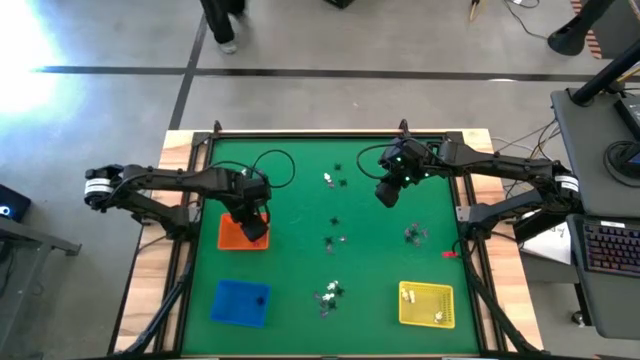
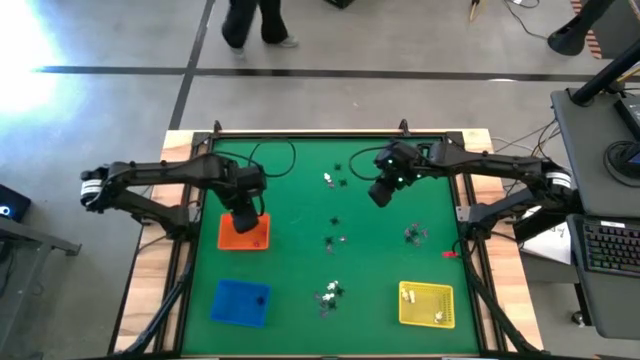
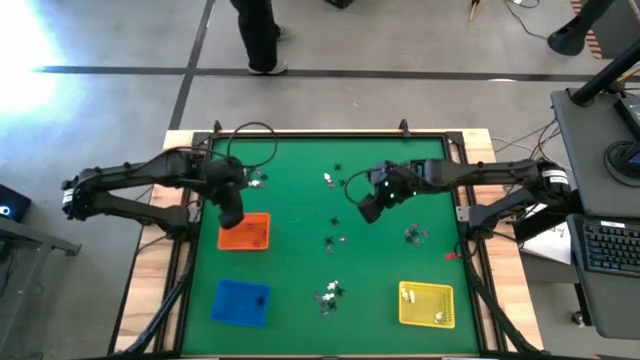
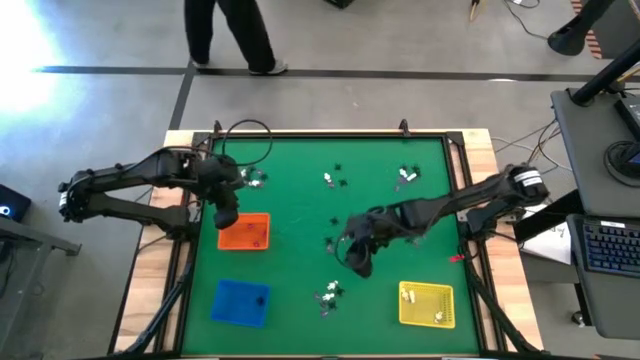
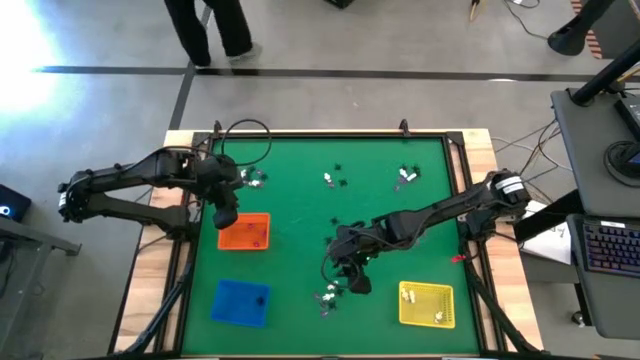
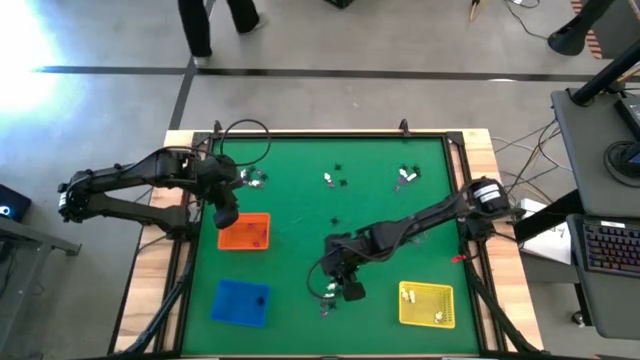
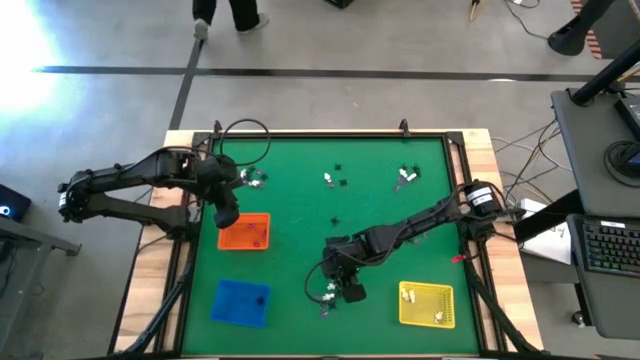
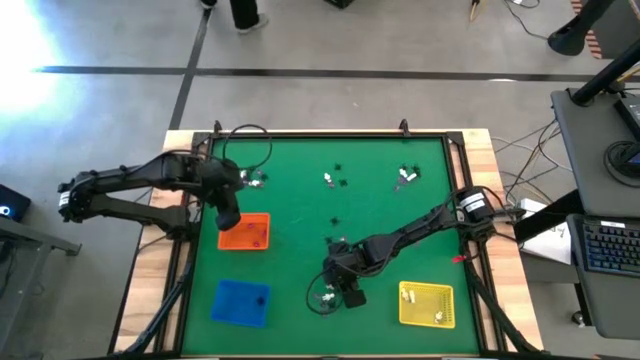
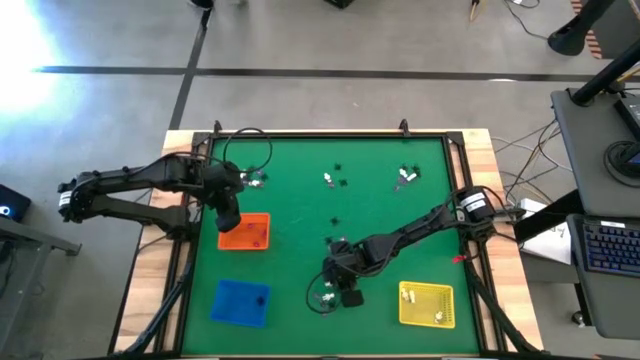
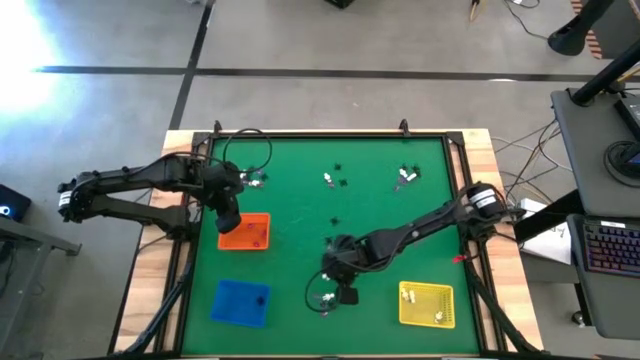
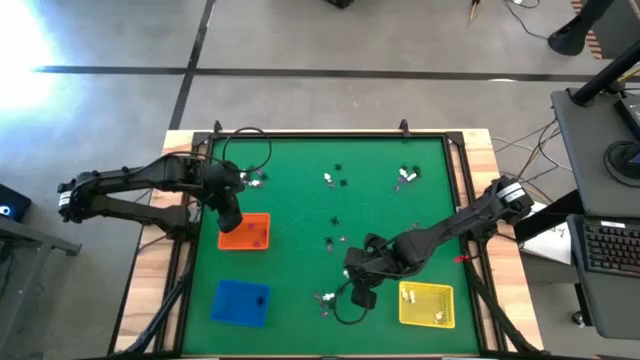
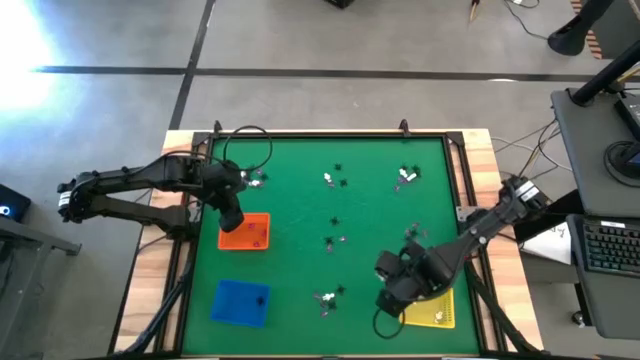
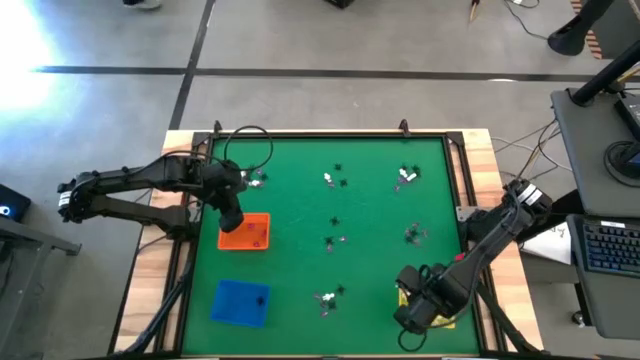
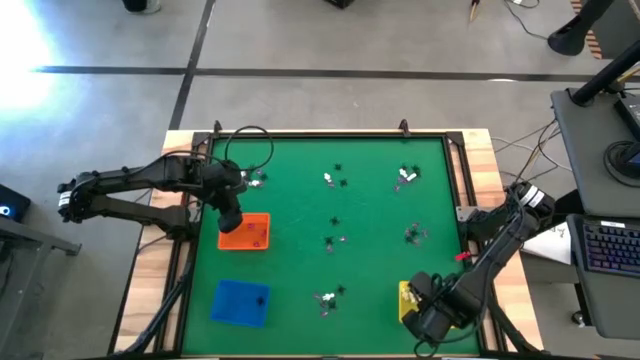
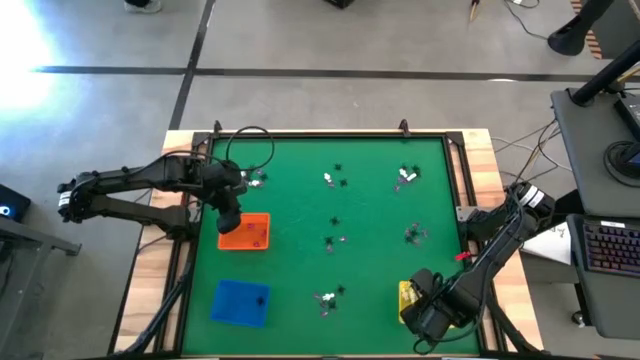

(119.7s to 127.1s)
Task: Sort Halloween decoration
Put the white skeleton toy into the yellow bin

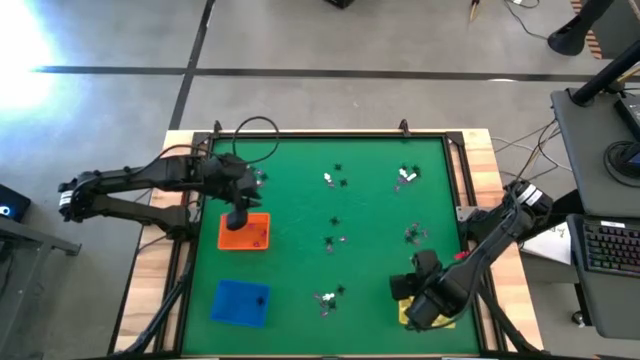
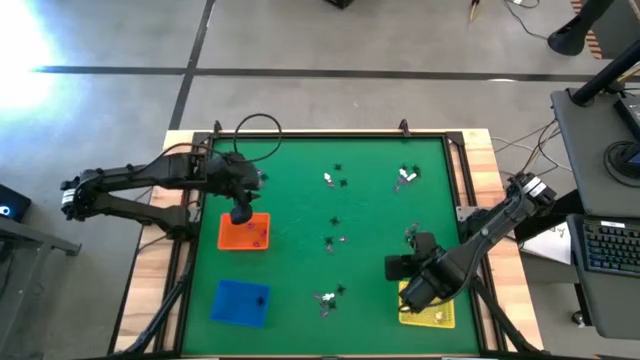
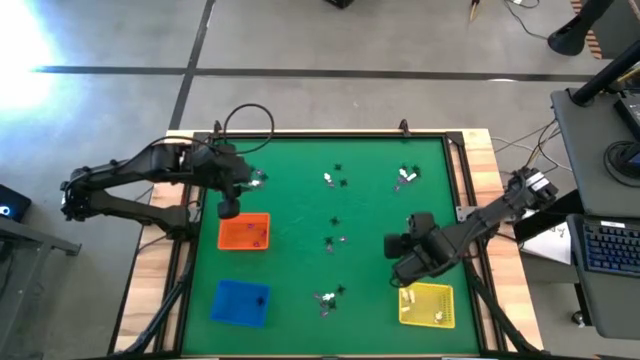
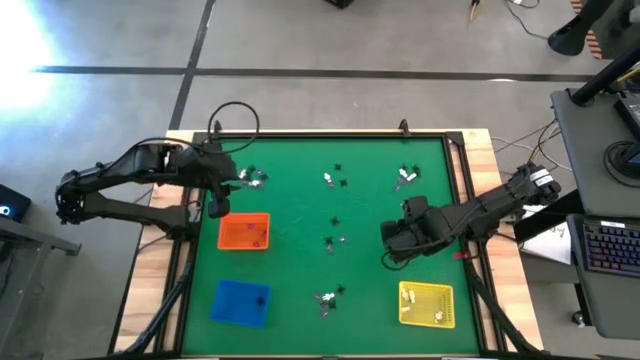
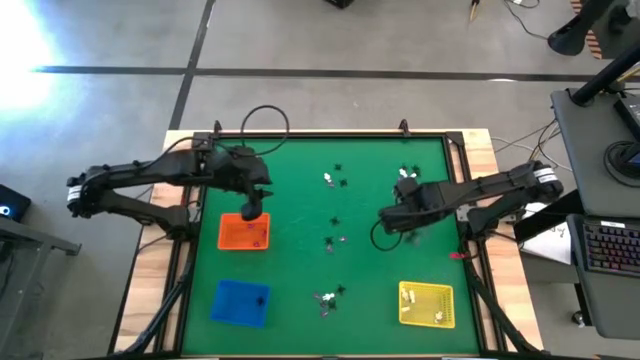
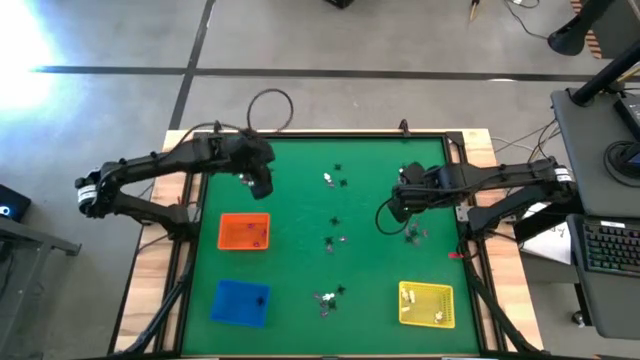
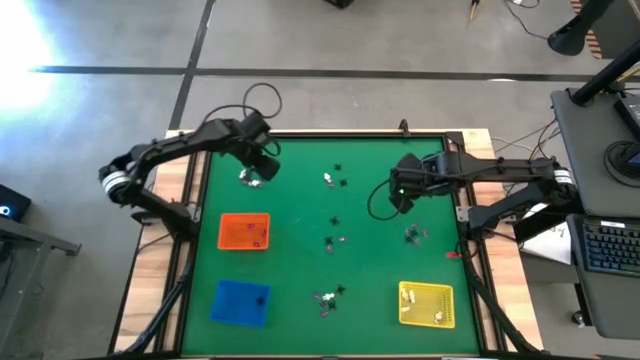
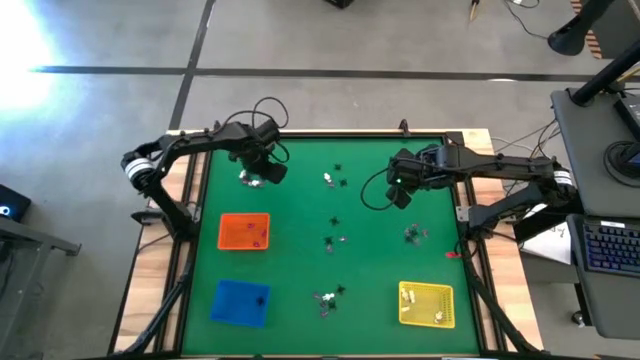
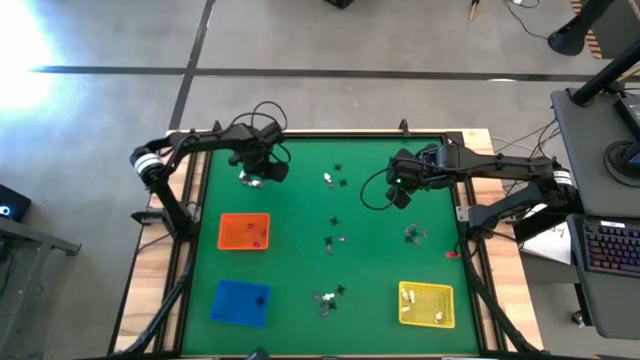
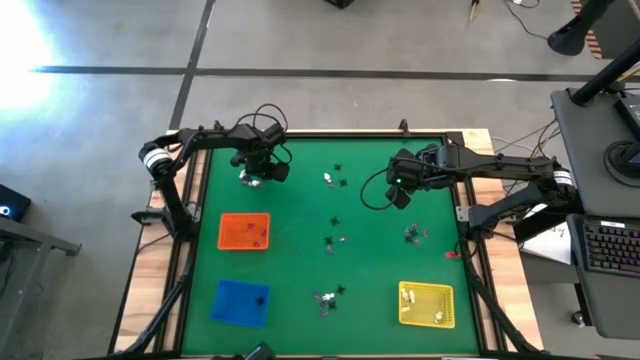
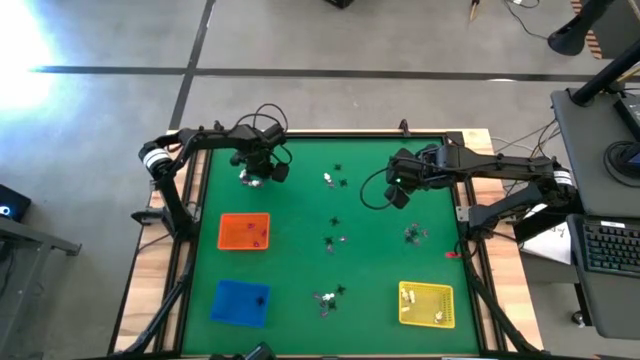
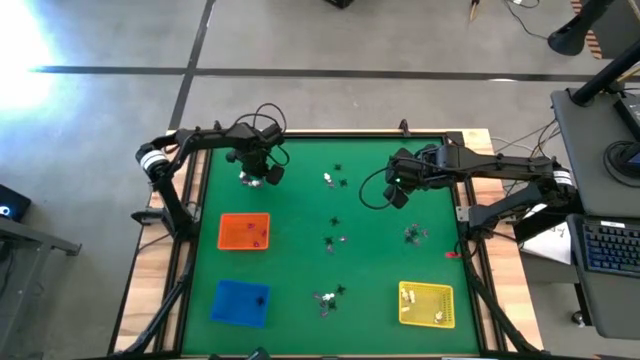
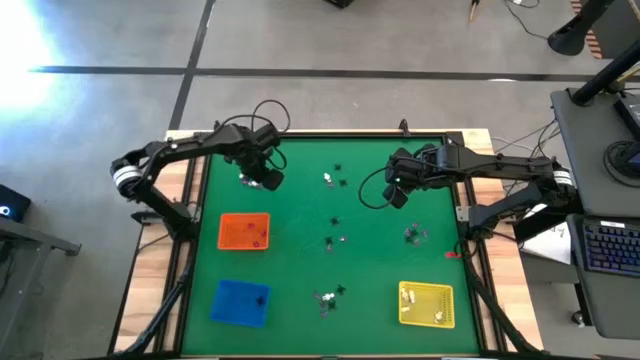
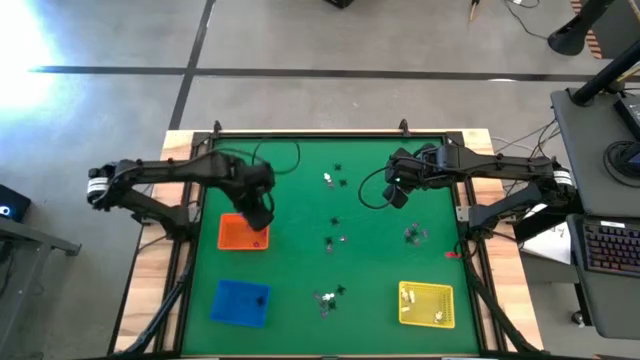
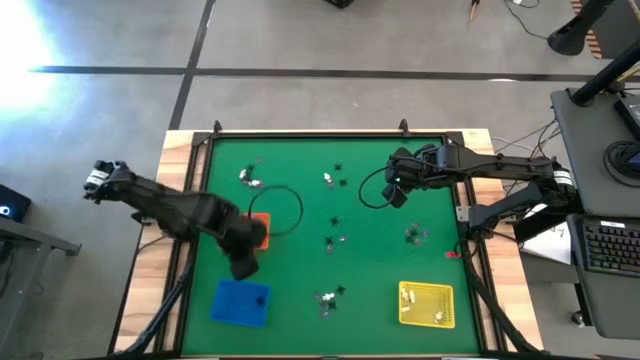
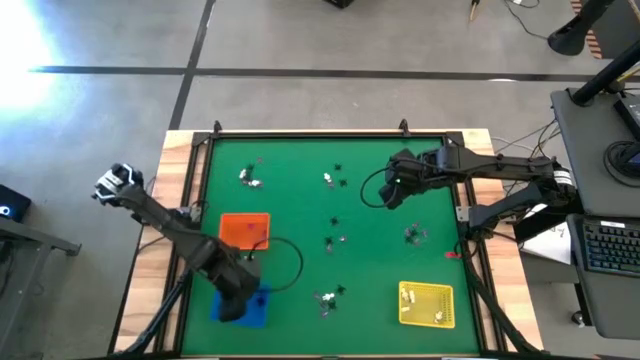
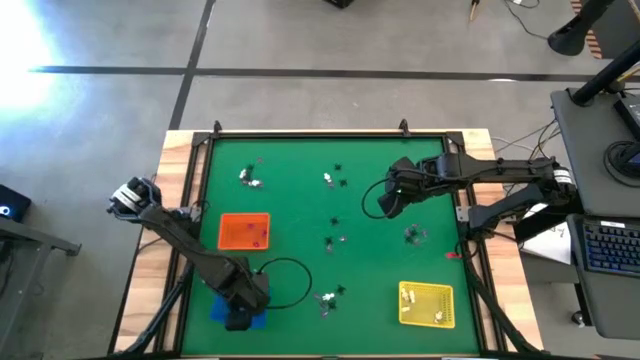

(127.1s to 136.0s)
Put the black spider toy into the blue bin

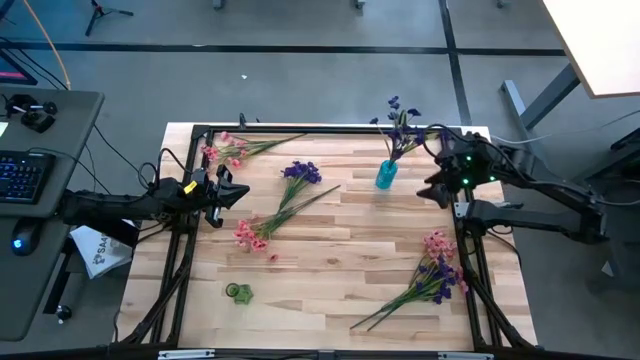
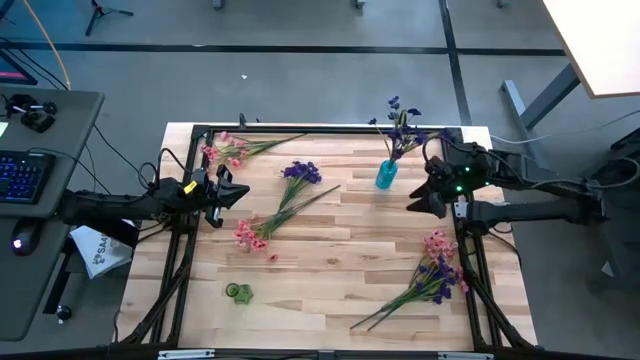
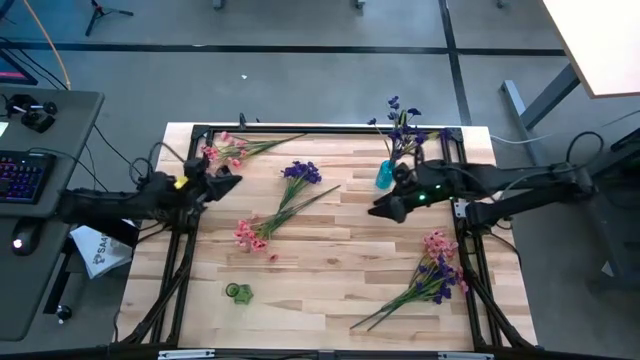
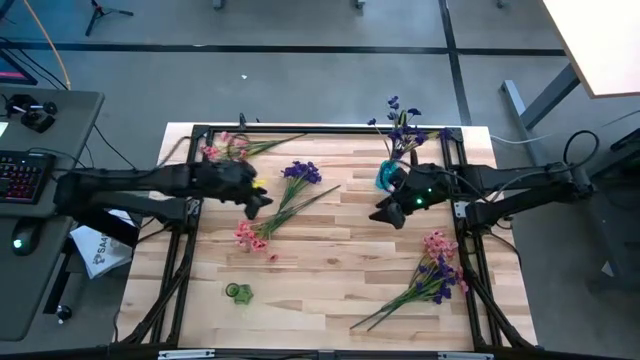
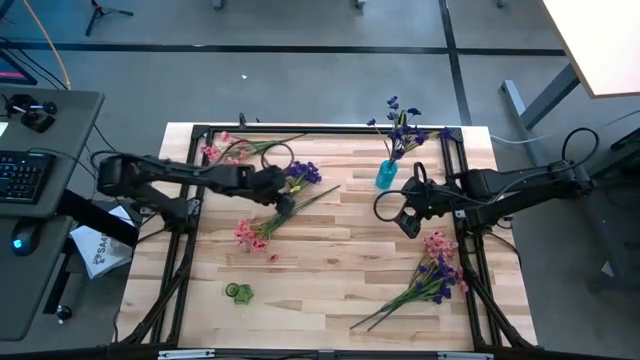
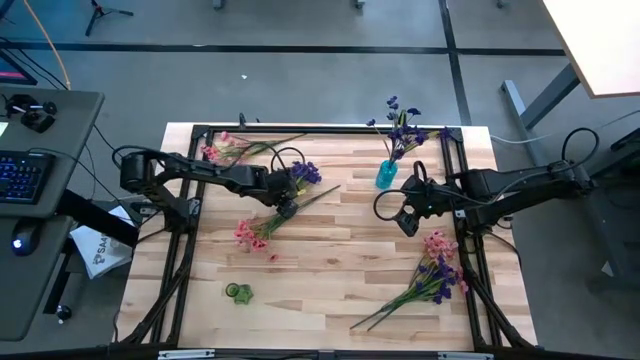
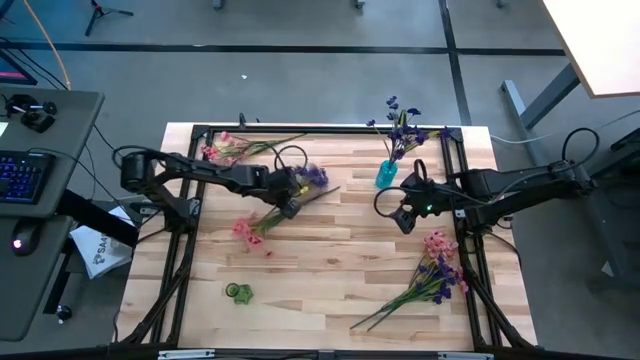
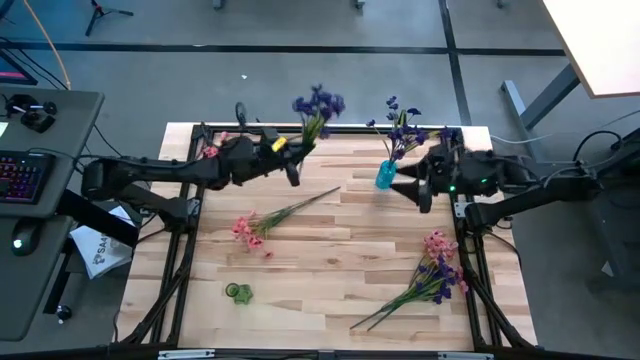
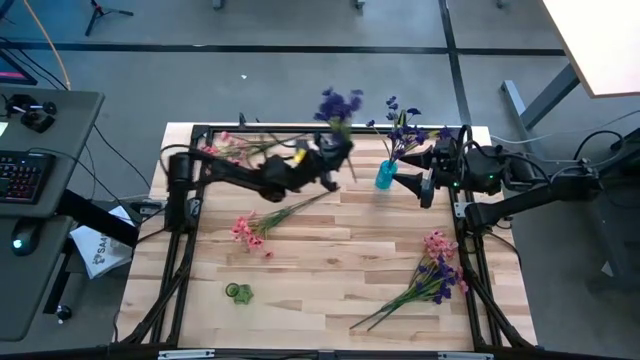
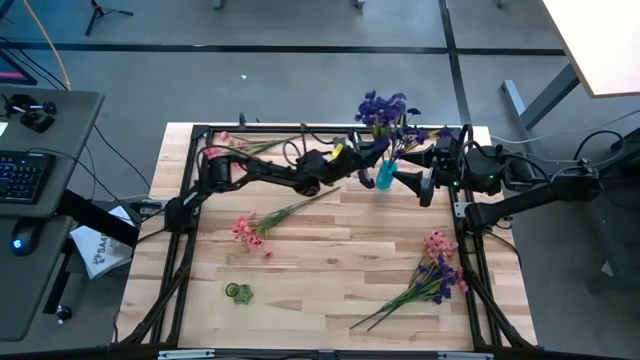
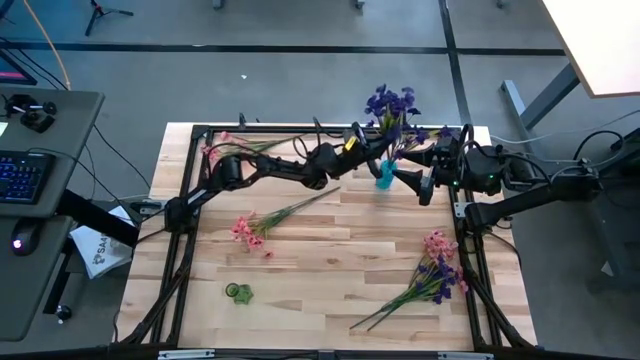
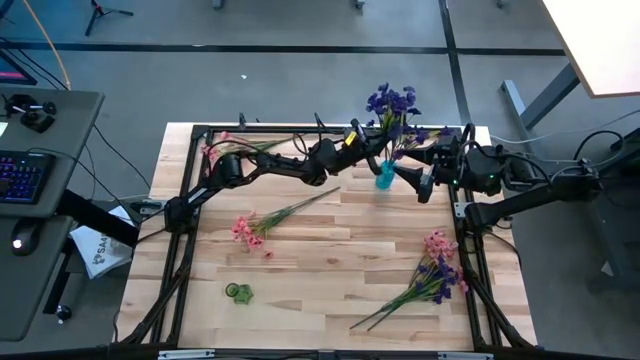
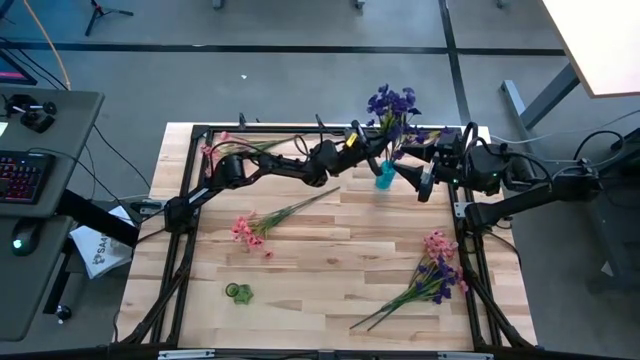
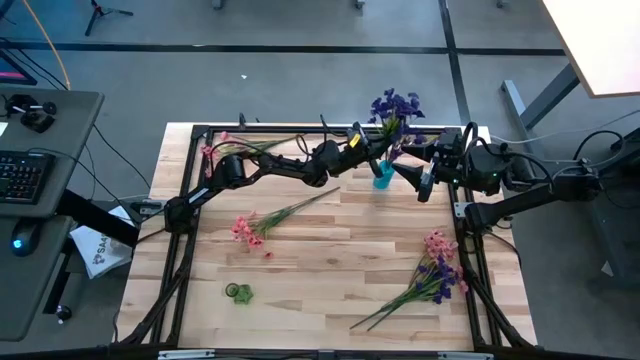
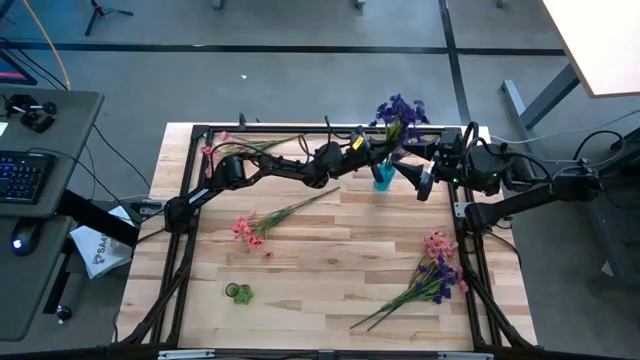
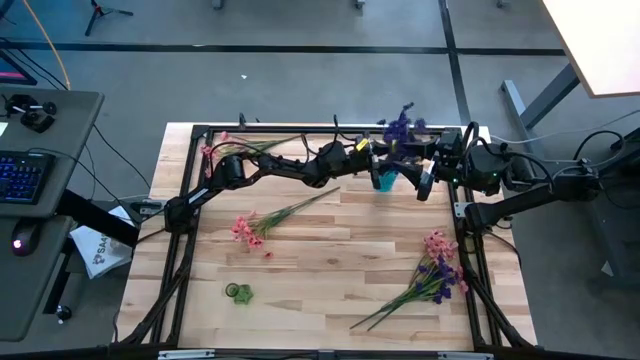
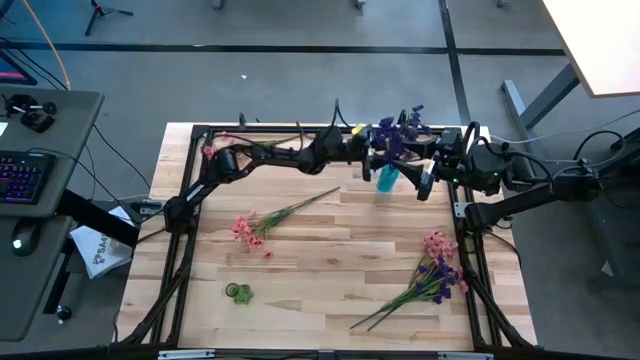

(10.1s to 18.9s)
Task: Sort flowers into vase by color
Put the top violet flowers into the blue vase
